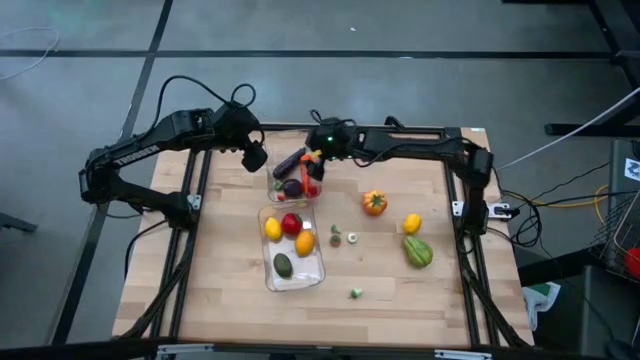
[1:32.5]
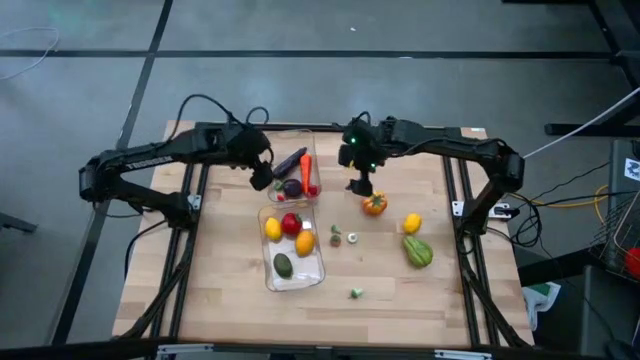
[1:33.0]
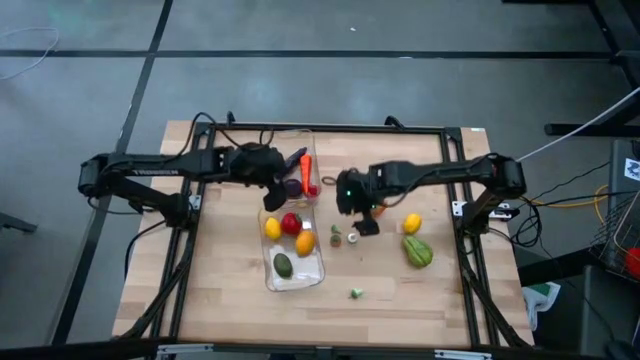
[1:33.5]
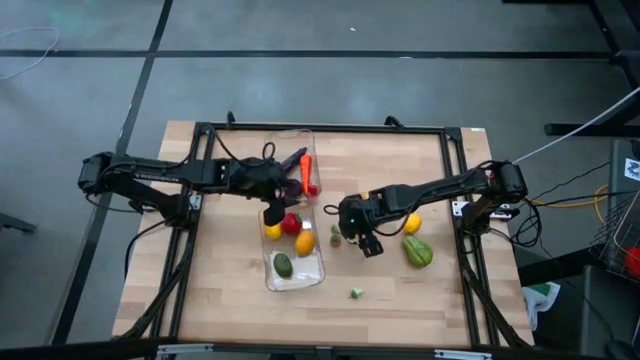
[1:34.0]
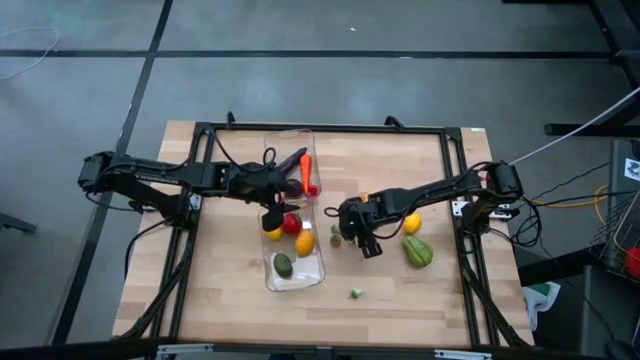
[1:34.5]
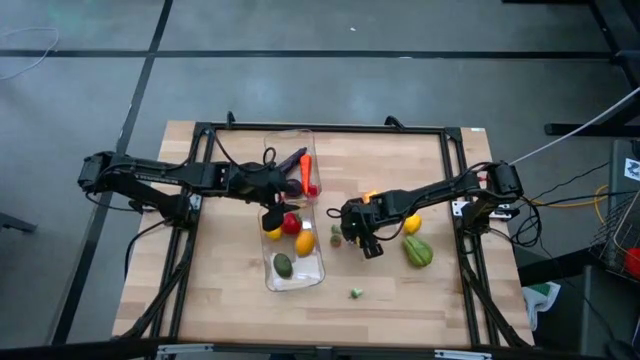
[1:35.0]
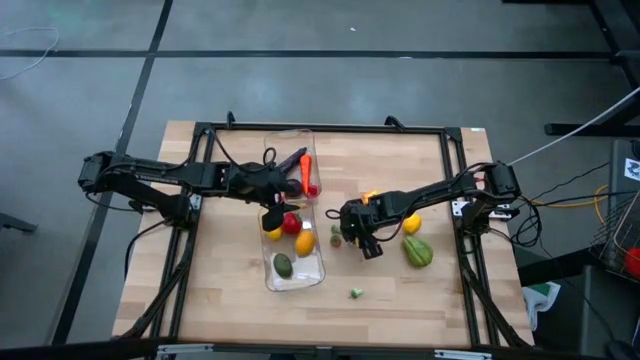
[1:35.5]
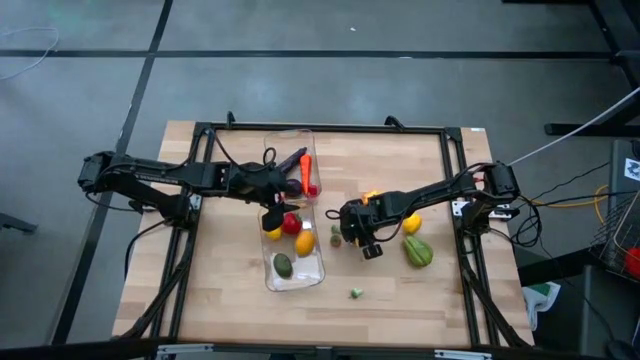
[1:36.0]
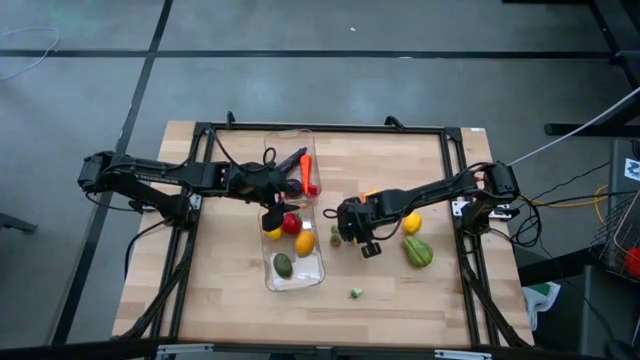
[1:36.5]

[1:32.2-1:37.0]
Task: Sort produce into baskets
Put the white mushroom into the top transparent bin

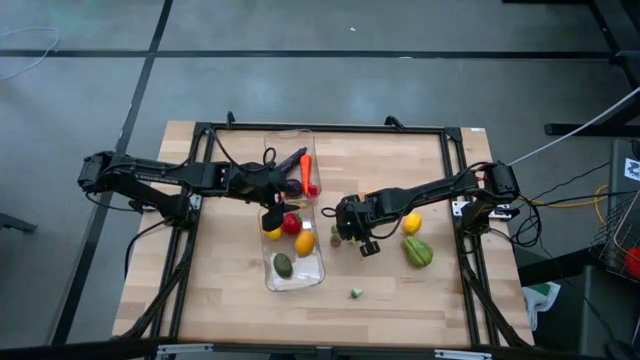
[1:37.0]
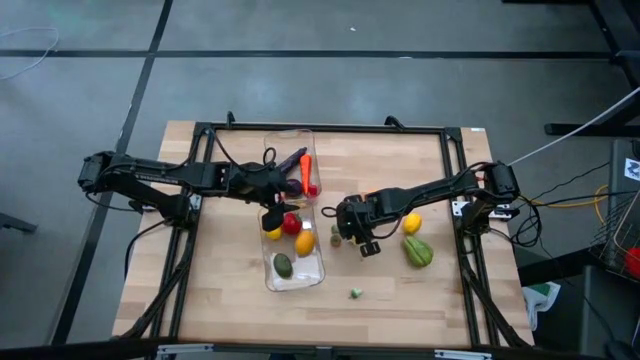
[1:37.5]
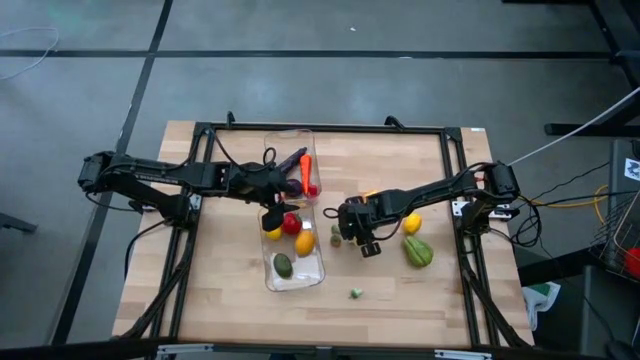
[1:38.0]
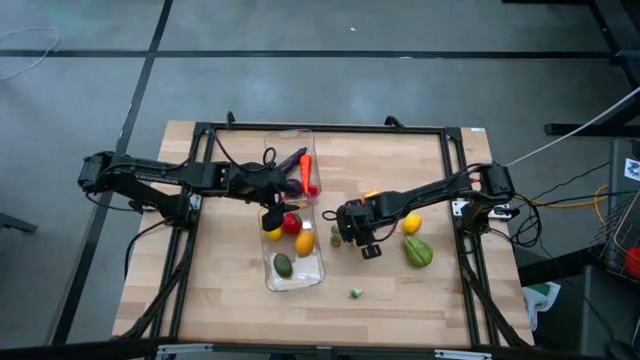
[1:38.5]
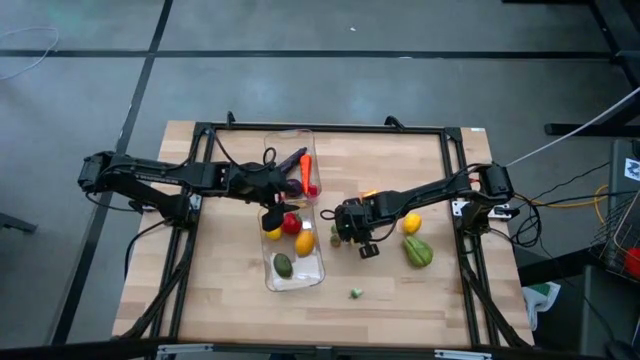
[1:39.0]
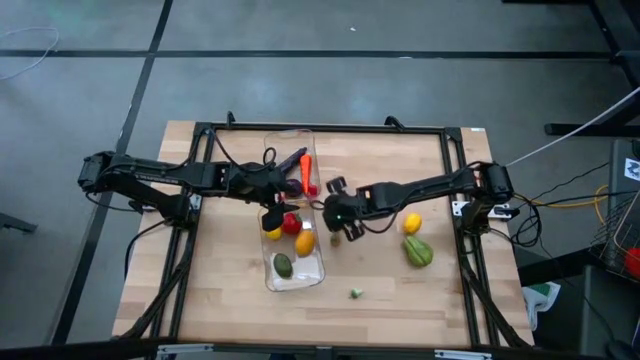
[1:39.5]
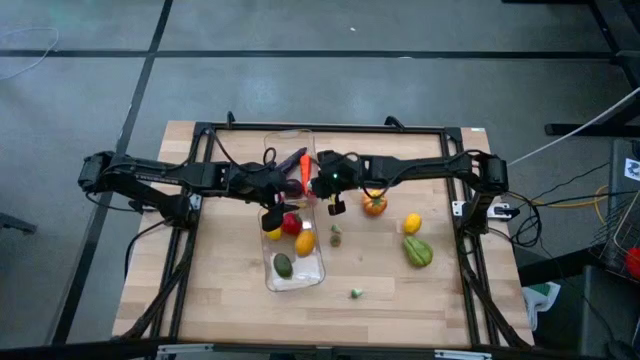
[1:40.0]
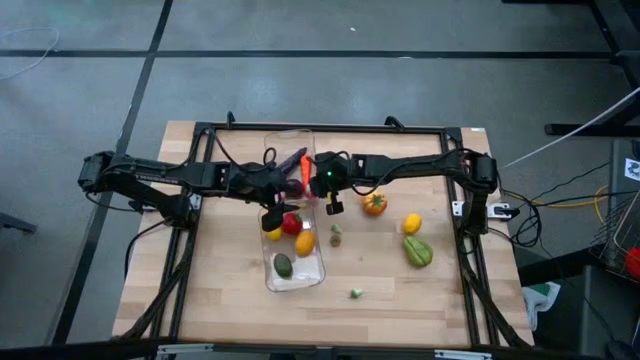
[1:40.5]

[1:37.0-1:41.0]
Put the white mushroom into the top transparent bin

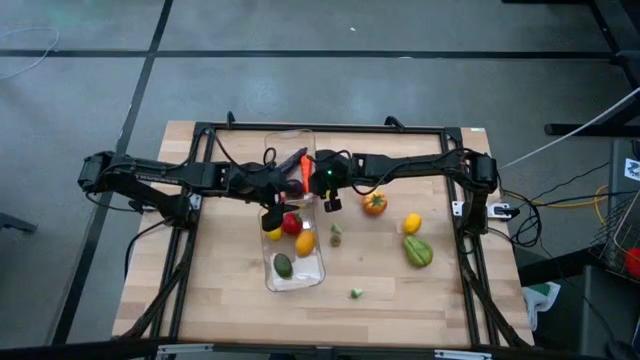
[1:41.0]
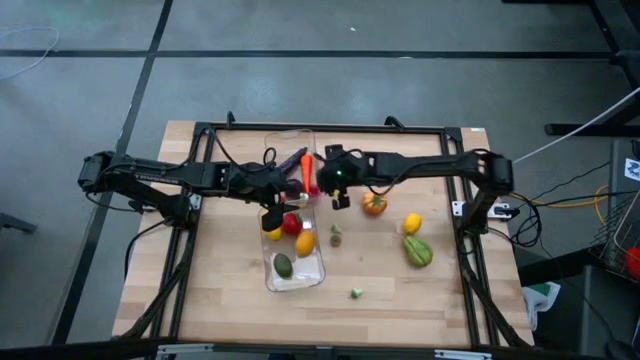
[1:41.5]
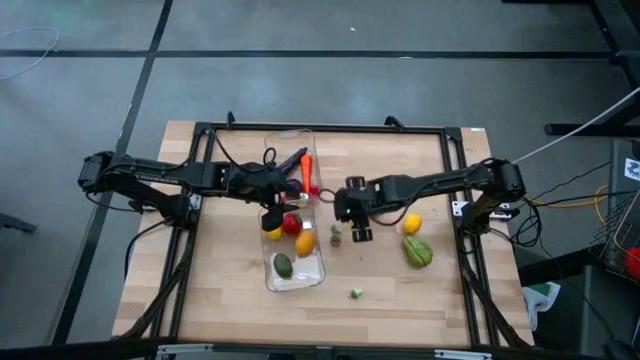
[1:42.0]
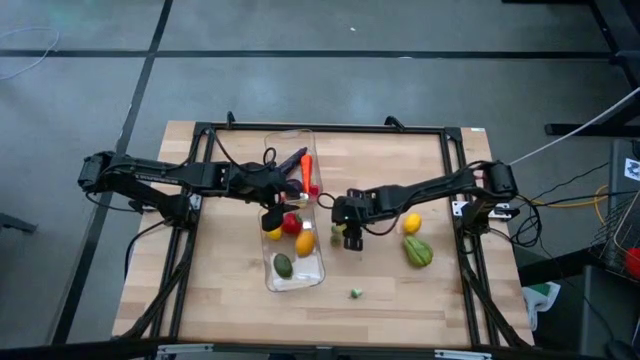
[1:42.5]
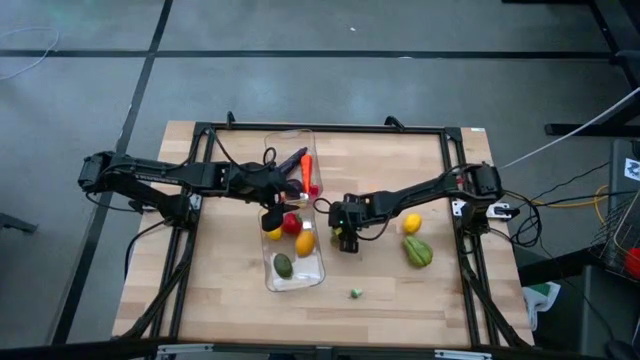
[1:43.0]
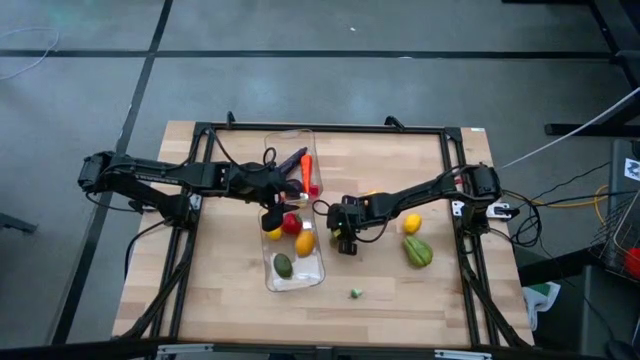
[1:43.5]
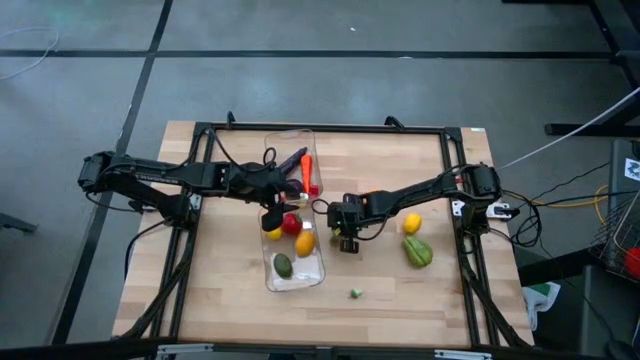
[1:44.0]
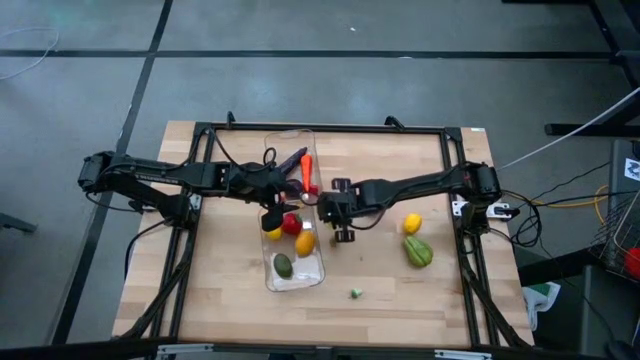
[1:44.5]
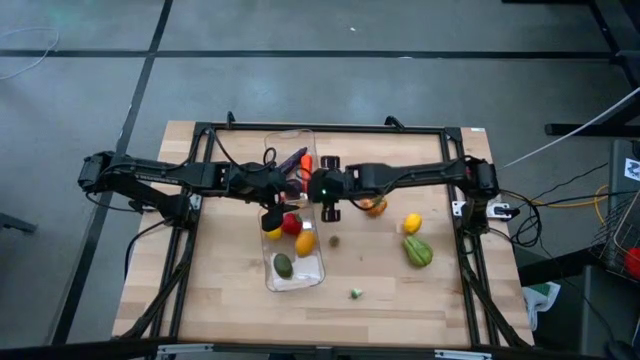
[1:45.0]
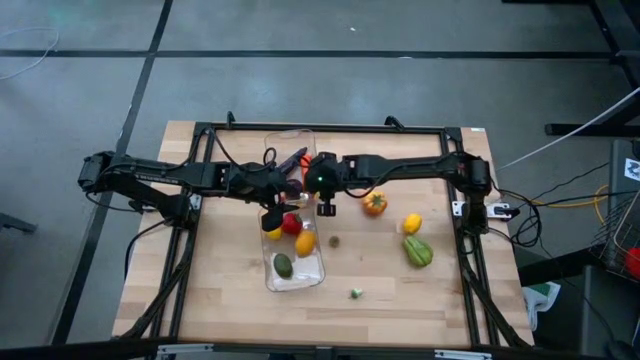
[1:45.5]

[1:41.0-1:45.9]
Put the top green mushroom into the top transparent bin

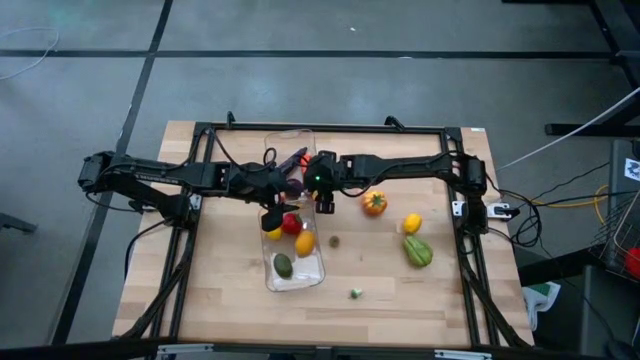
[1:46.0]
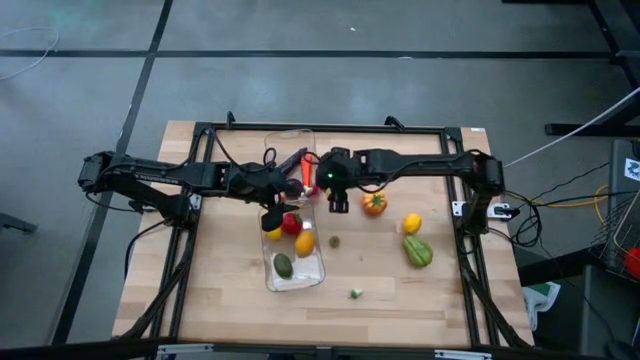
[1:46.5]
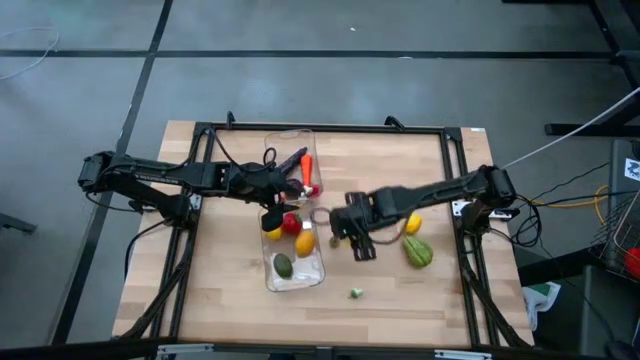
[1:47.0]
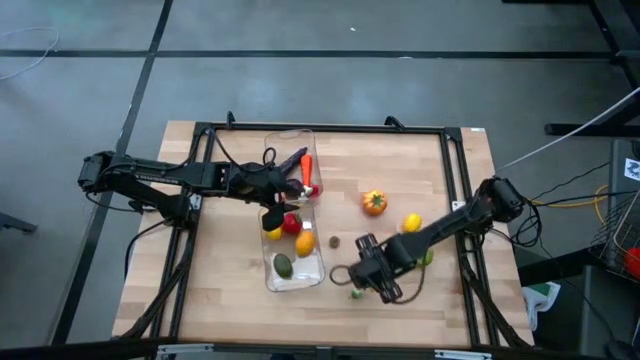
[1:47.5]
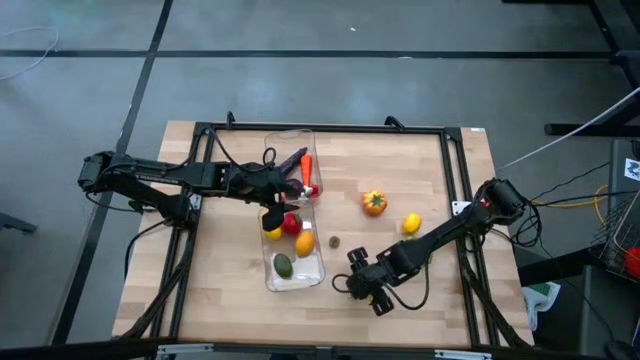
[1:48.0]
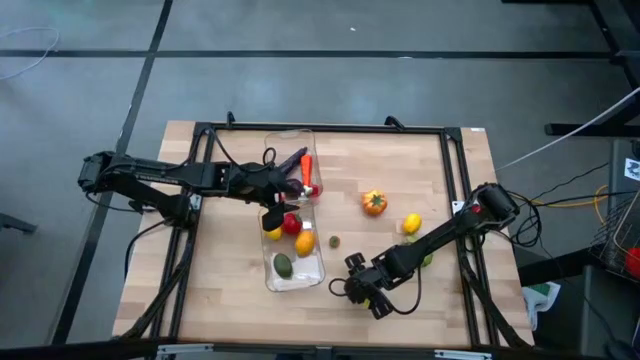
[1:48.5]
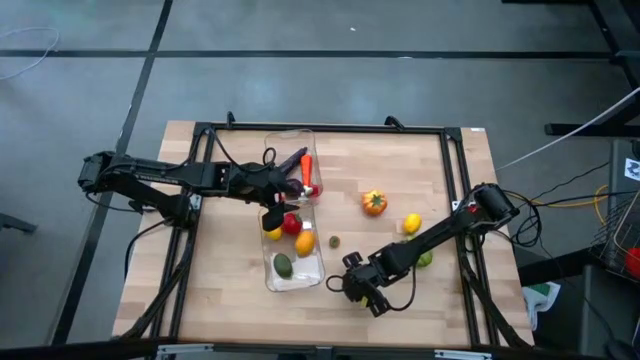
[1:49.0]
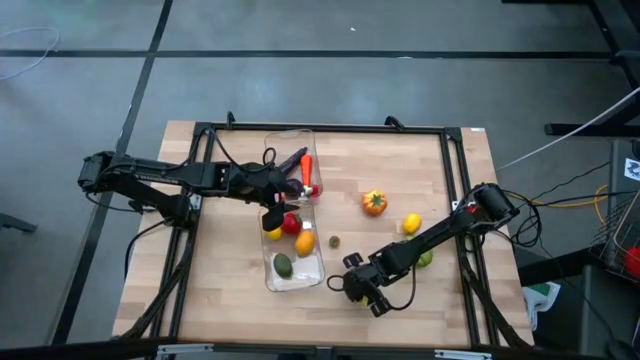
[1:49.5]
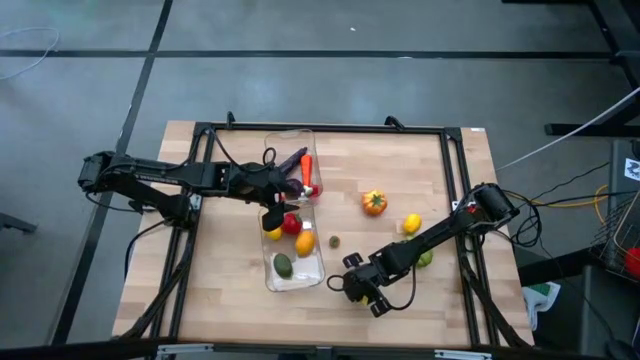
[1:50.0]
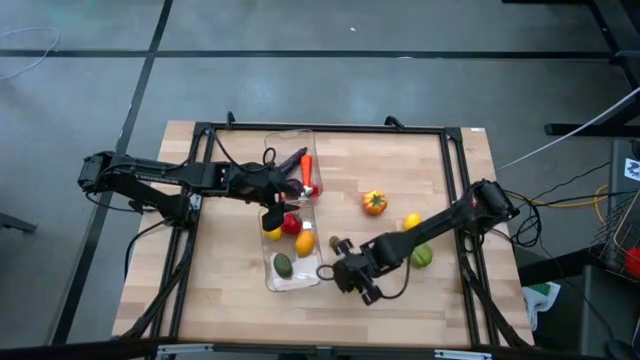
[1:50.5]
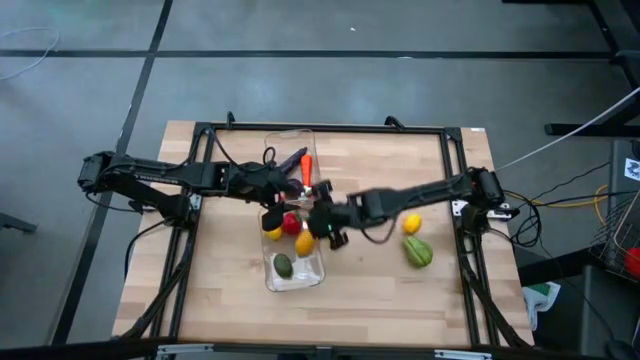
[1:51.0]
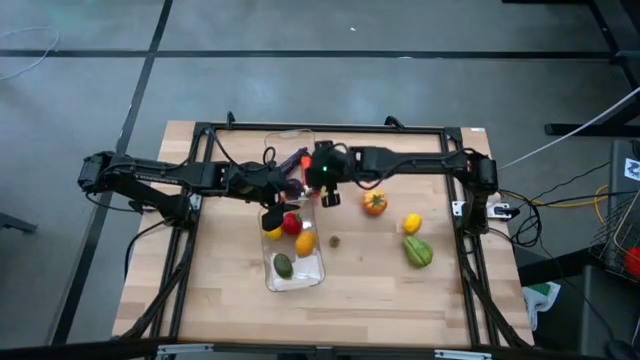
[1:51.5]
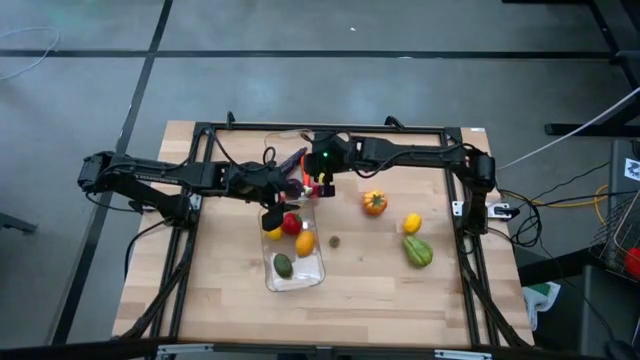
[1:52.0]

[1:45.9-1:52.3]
Put the green mushroom into the top transparent bin

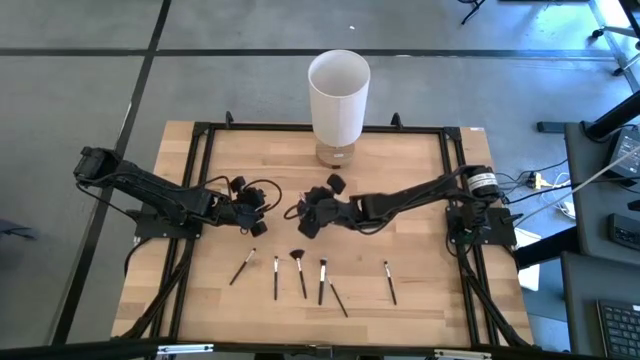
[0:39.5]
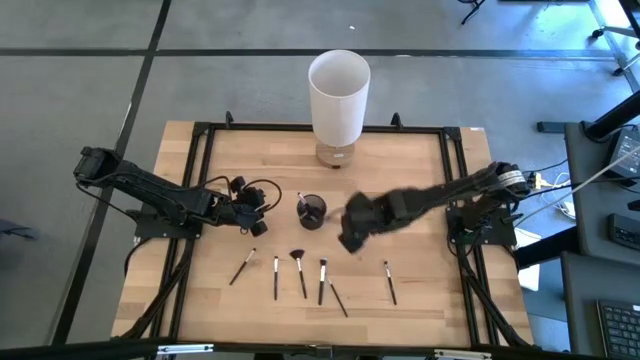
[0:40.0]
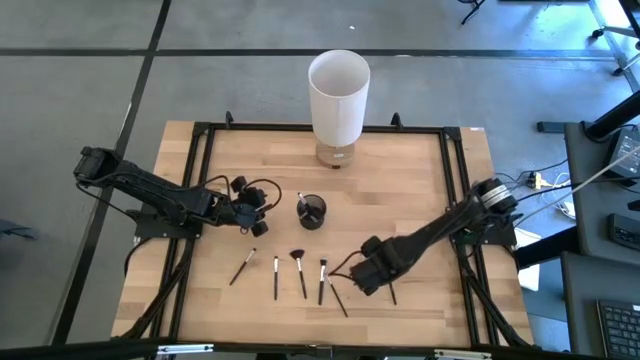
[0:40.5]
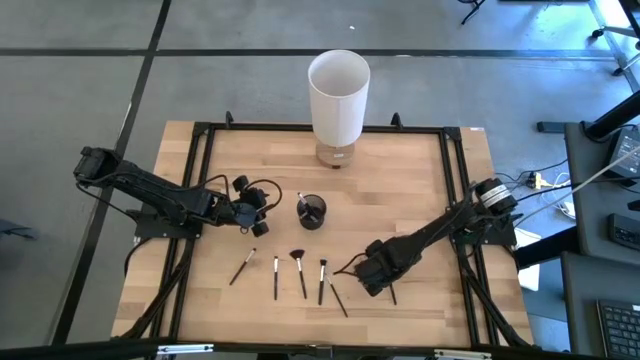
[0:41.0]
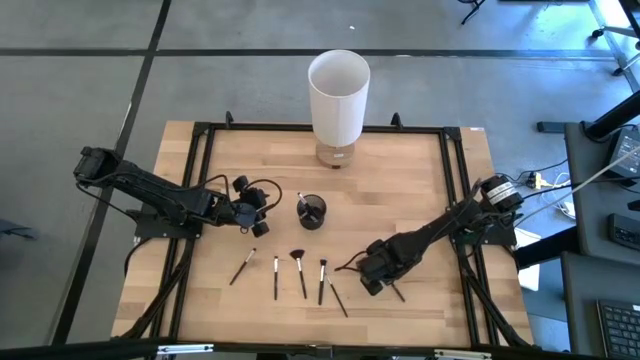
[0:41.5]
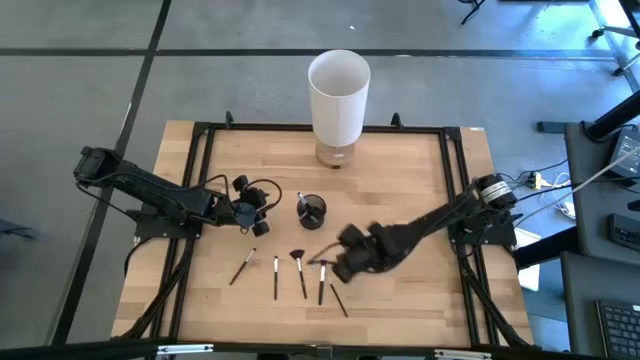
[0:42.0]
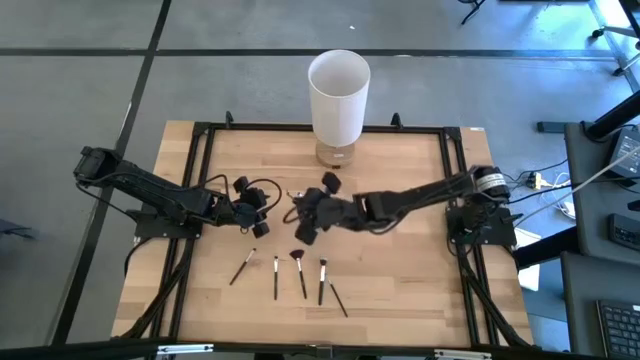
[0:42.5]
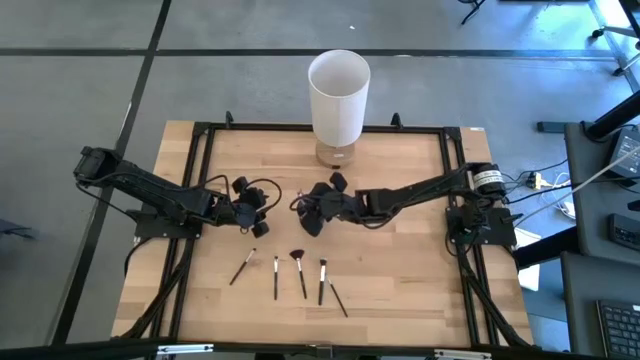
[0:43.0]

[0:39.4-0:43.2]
Task: Put items in baskets/containers
Put the black eyeshadow brush into the black pen holder
